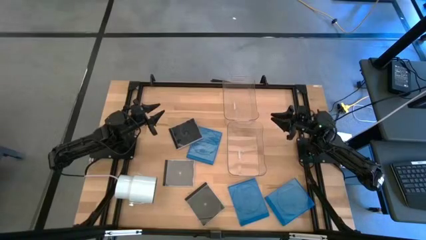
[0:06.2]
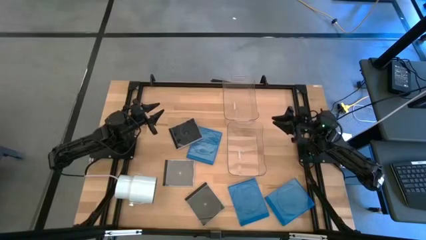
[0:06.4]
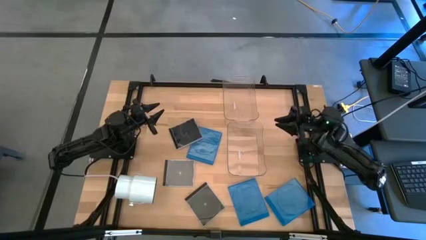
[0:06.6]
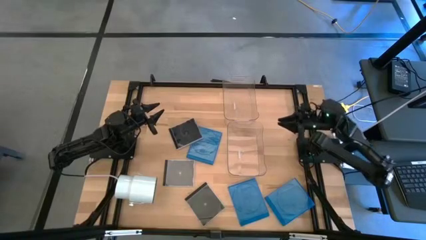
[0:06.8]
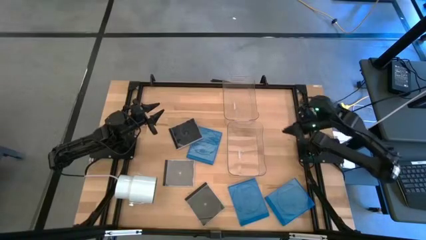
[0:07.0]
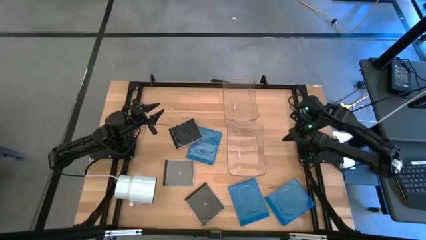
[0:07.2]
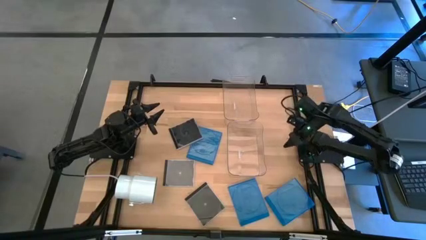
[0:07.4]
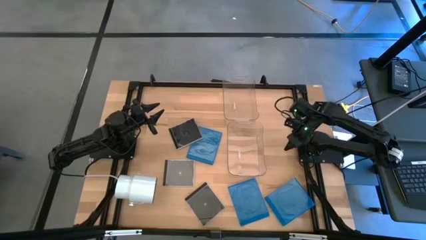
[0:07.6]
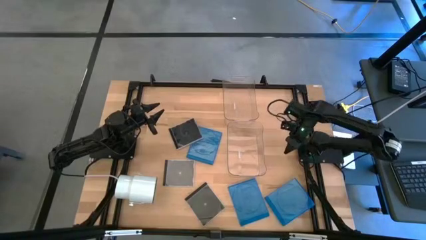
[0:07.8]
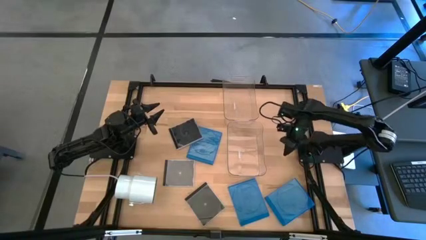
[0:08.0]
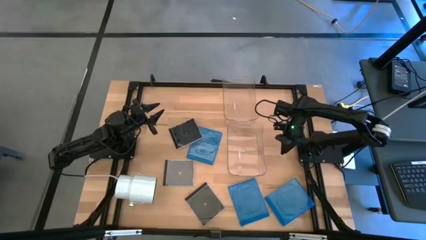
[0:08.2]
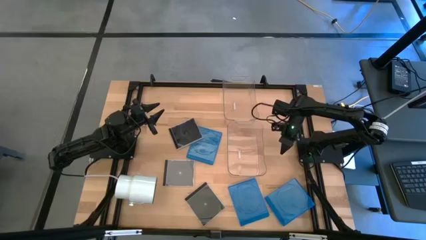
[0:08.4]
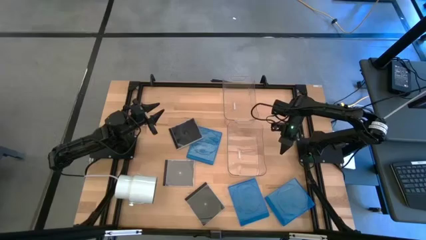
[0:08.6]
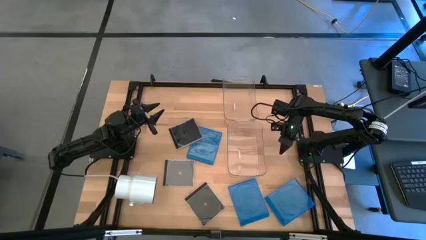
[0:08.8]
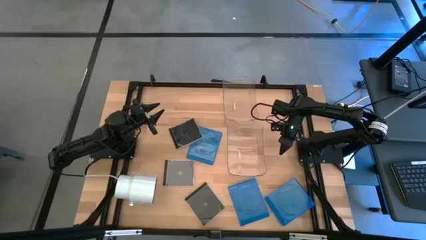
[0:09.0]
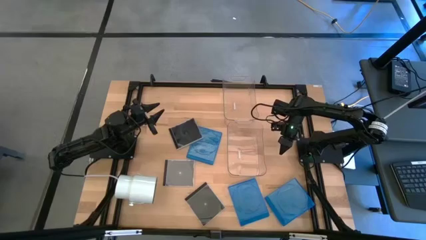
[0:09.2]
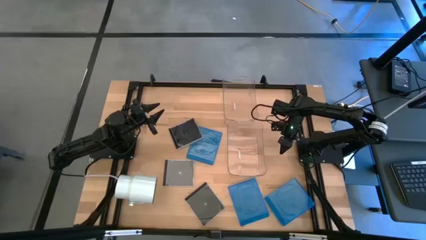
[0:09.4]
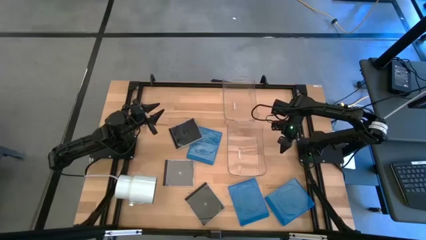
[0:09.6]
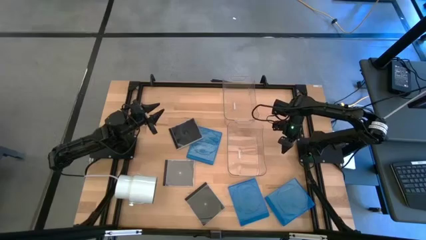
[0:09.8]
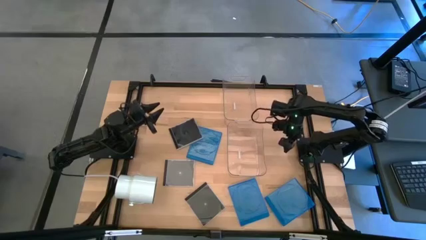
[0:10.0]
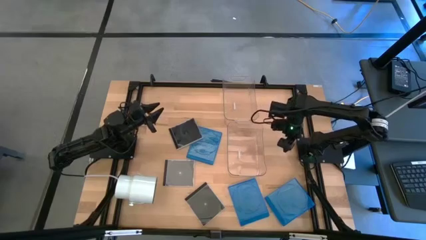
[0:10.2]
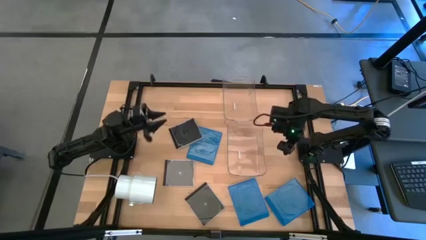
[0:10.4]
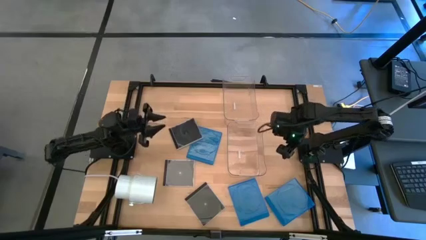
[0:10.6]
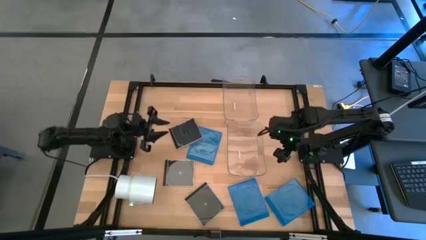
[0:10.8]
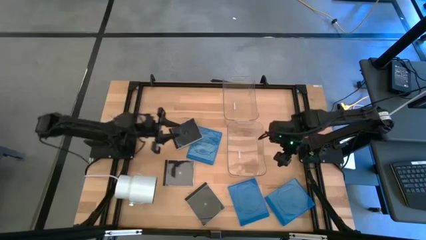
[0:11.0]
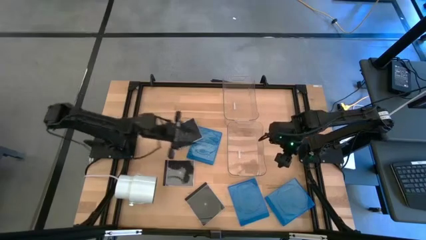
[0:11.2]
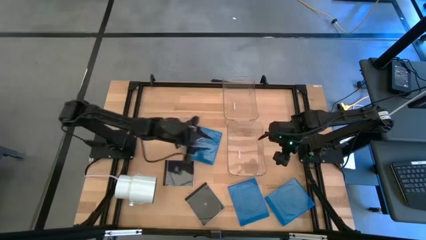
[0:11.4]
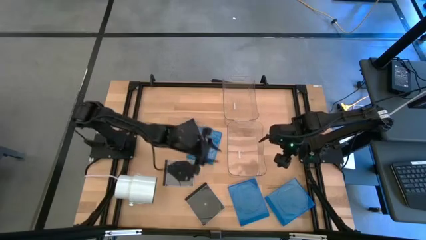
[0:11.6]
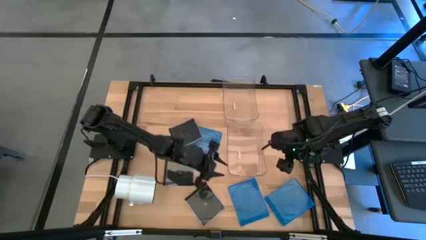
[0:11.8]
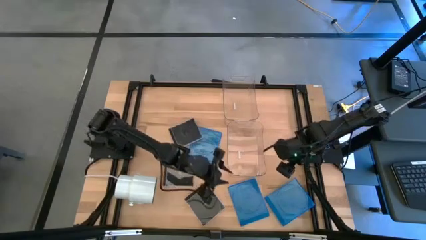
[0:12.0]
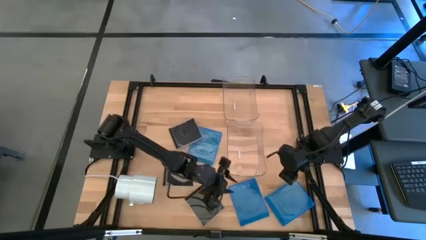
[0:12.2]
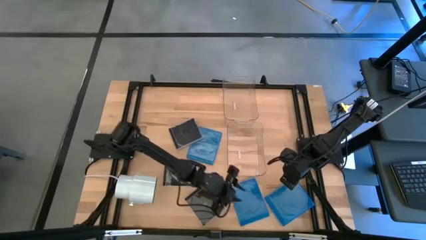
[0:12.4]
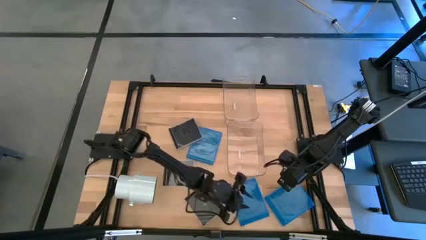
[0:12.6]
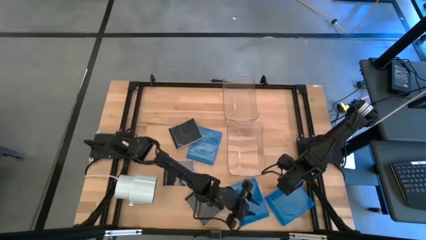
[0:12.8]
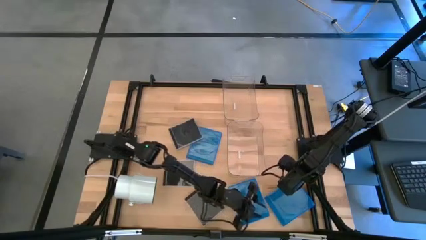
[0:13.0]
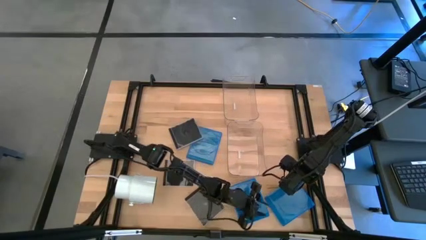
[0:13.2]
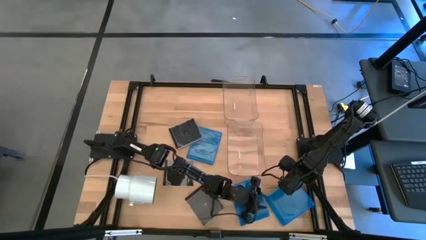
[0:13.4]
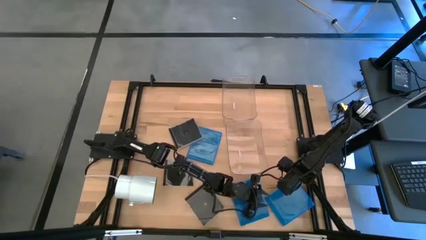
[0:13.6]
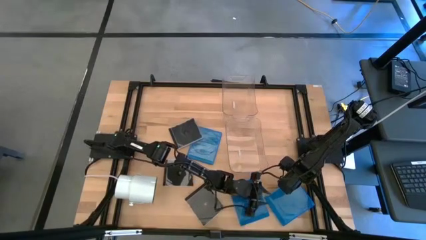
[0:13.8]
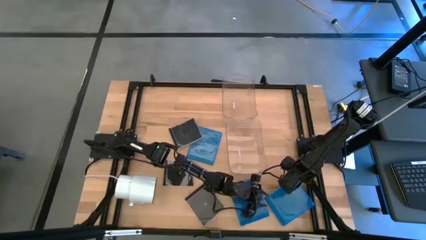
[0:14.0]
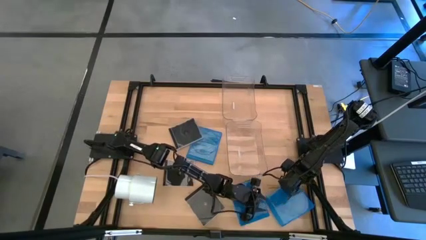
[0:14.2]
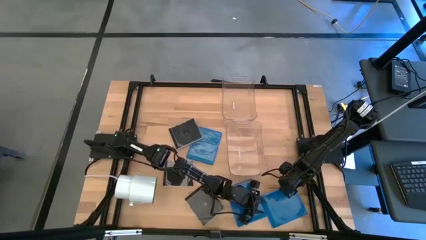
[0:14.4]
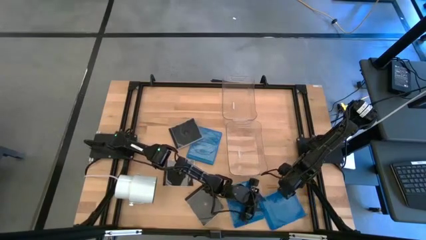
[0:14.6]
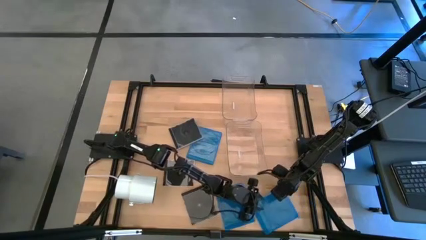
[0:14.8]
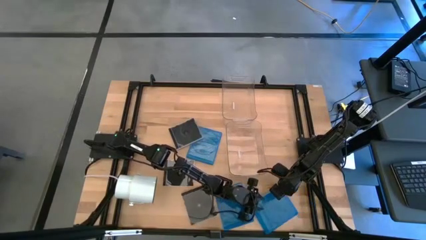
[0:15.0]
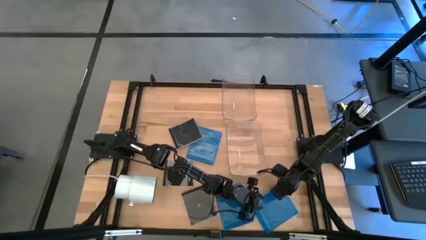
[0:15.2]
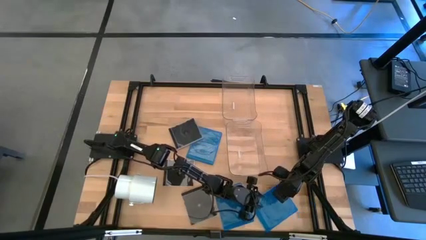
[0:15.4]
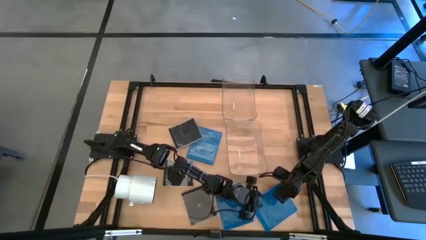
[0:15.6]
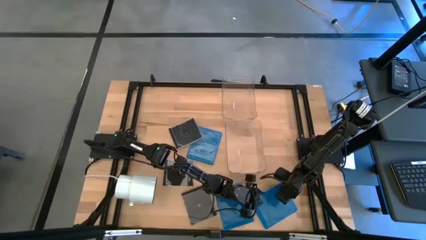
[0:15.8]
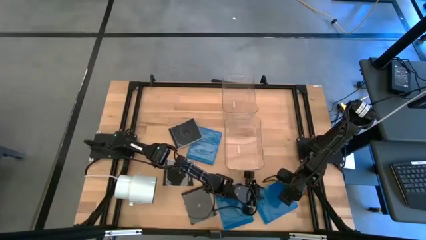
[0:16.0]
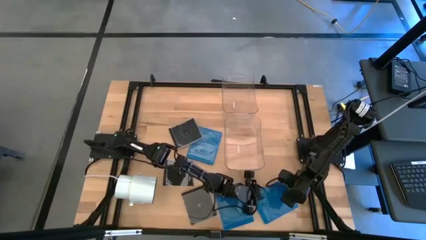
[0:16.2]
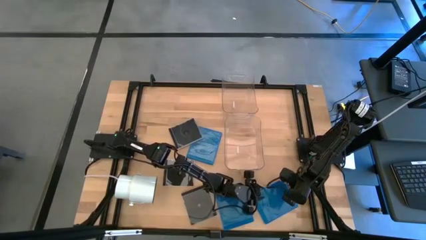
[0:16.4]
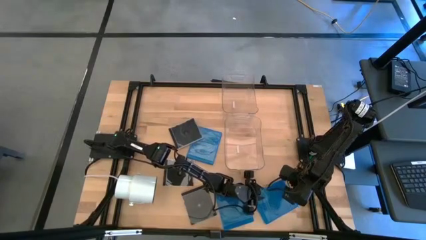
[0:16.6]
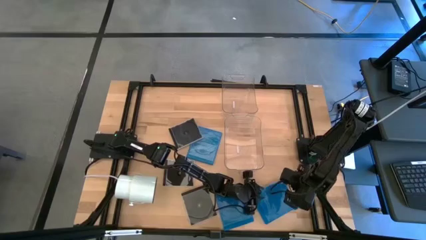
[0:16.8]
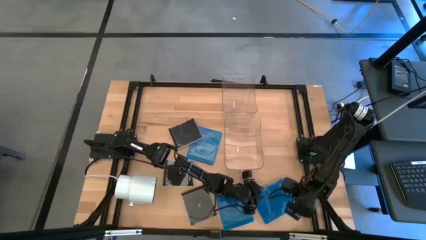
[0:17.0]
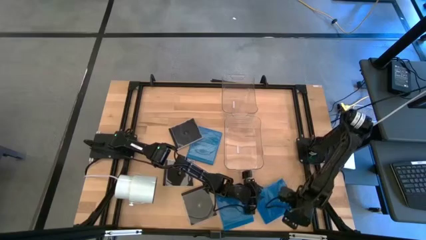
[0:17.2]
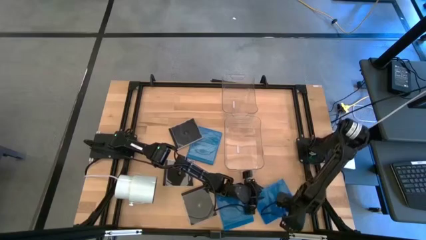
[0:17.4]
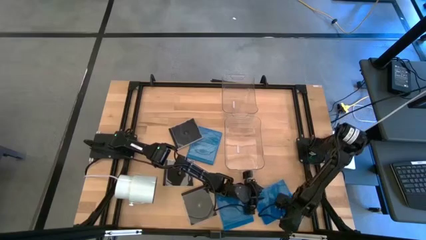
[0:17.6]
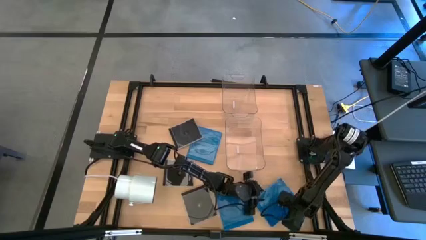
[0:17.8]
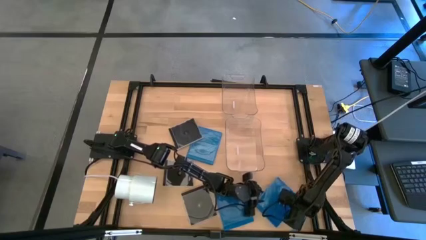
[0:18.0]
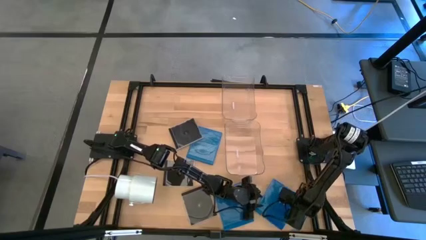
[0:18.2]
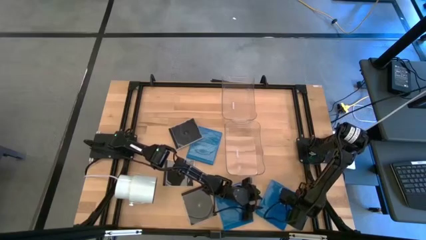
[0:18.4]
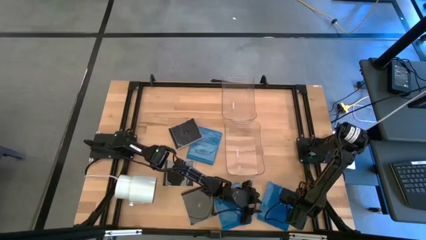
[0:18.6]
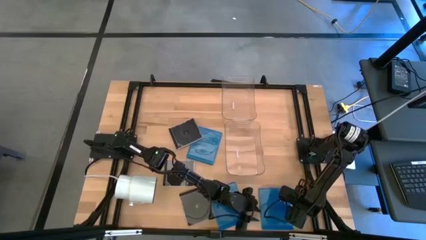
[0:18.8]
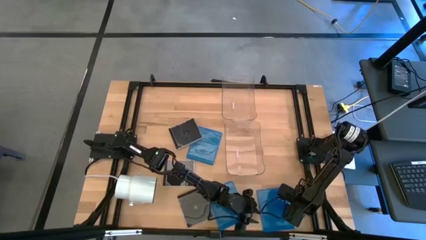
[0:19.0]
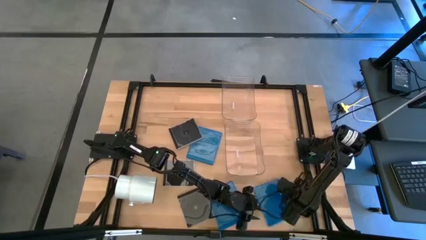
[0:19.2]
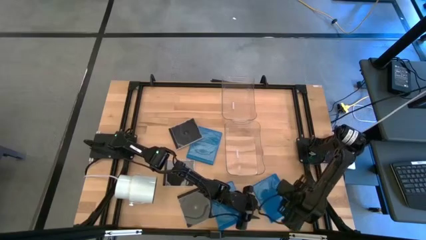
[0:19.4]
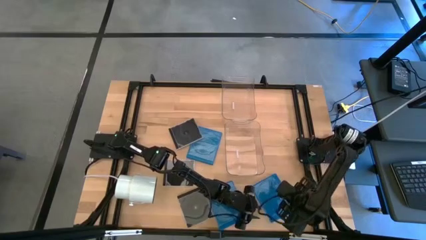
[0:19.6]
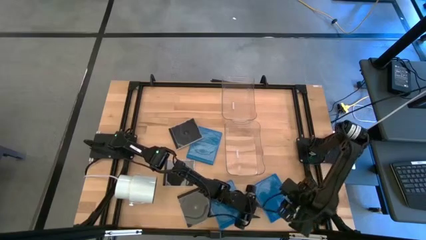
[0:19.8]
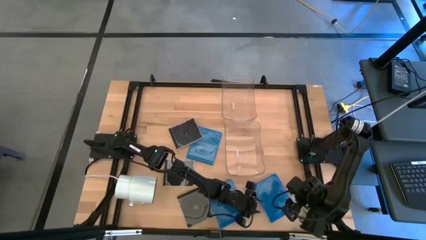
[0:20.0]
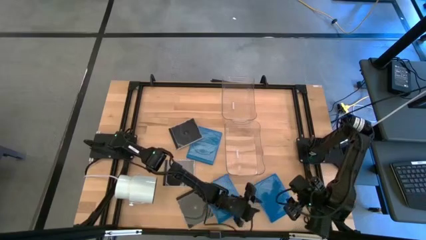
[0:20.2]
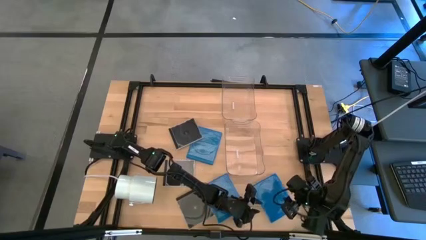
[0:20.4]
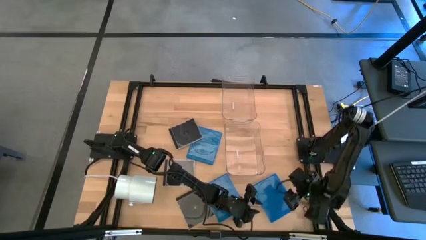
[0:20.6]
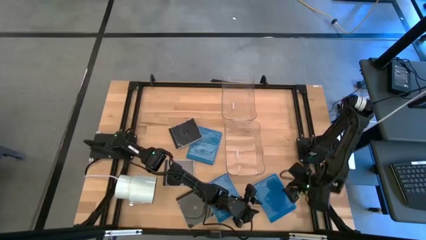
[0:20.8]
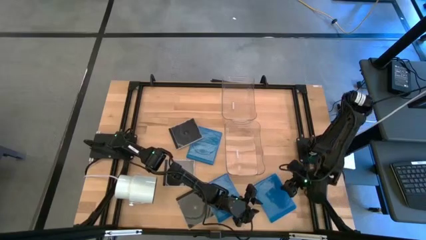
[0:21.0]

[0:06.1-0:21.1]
Task: Pick & place jewel cases by type
Put the bottom right blue CD case into the top transparent bin
